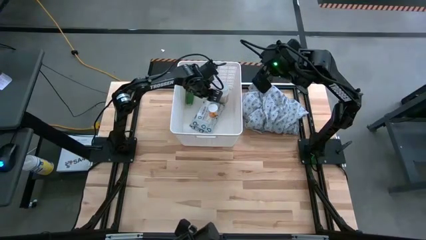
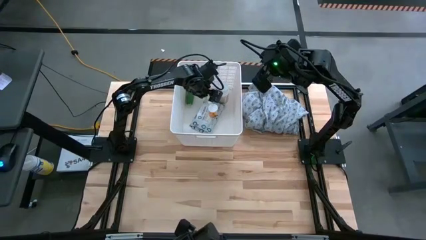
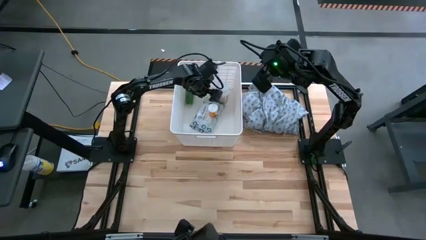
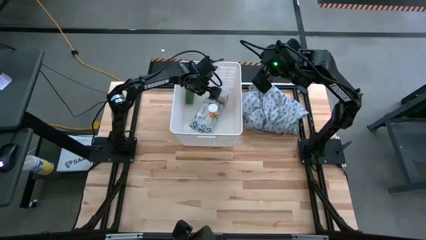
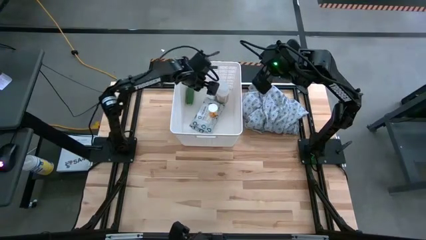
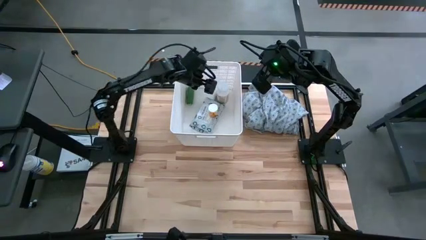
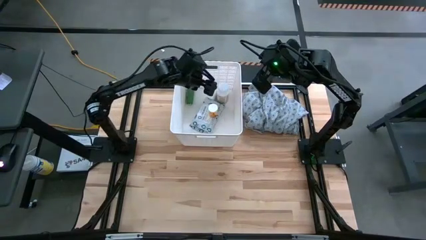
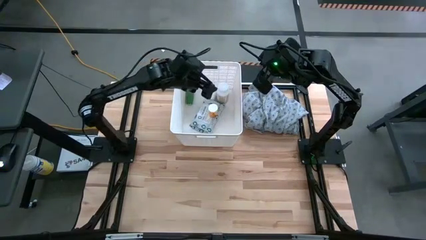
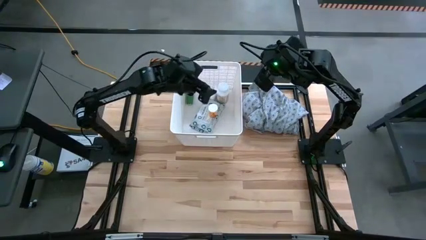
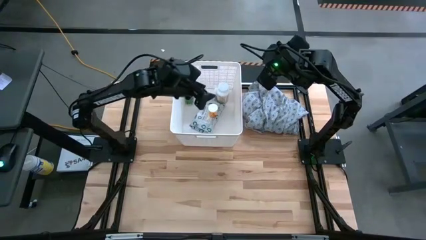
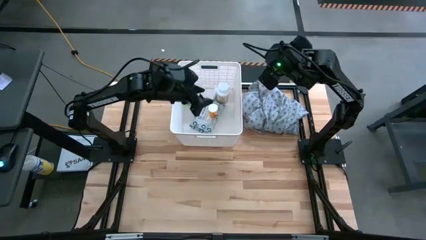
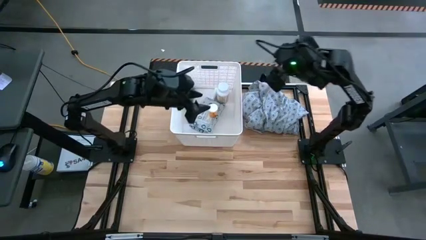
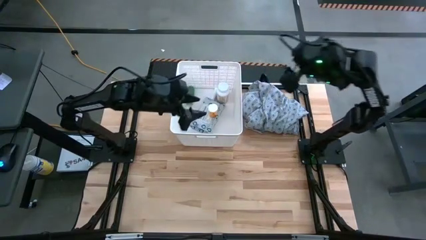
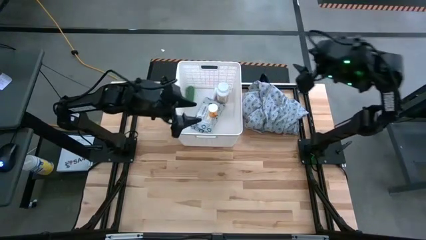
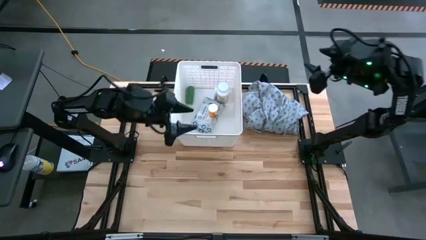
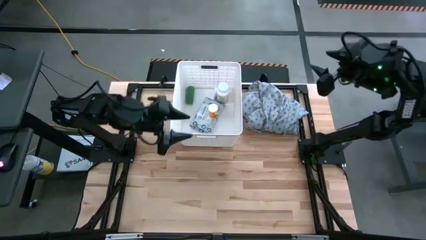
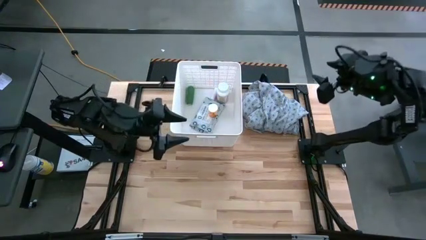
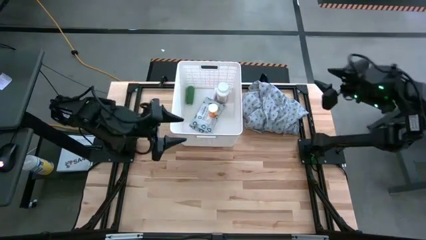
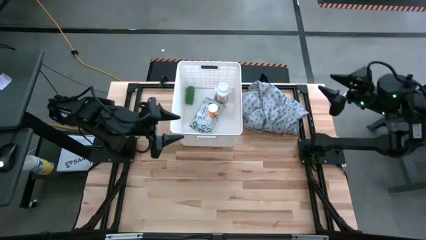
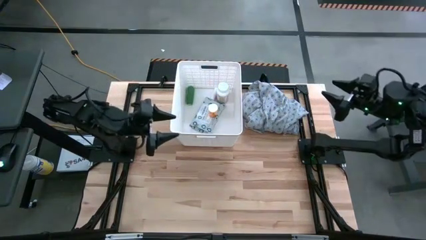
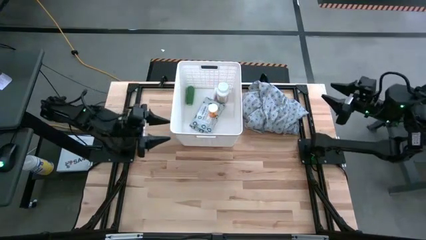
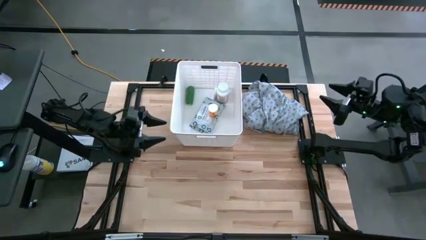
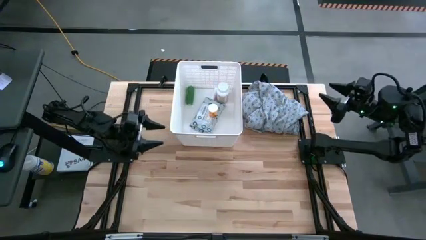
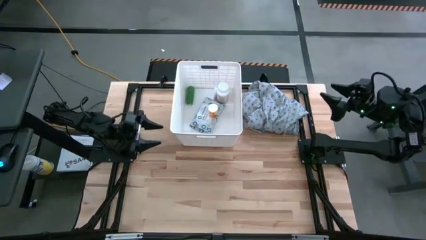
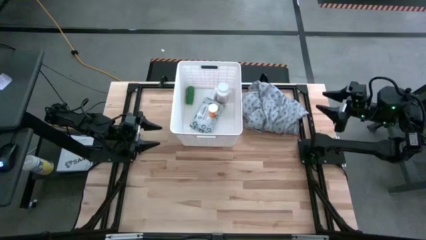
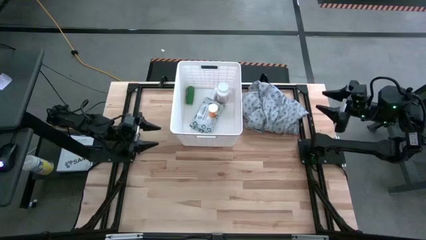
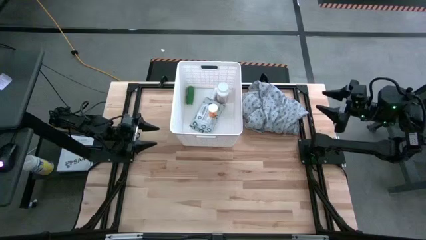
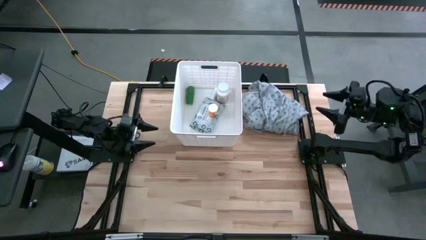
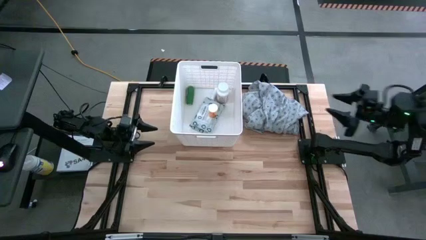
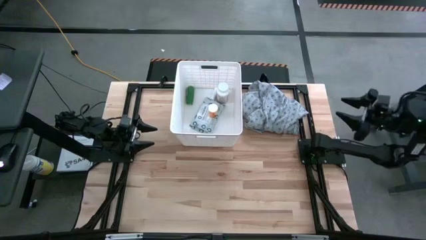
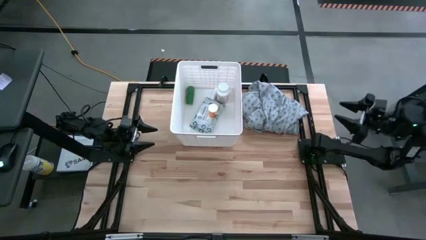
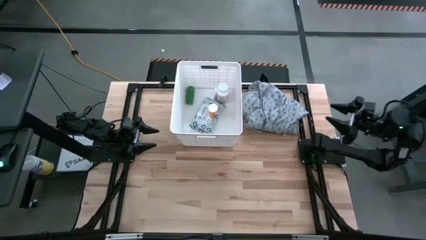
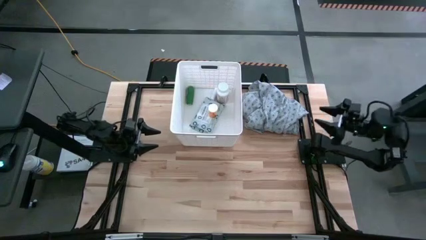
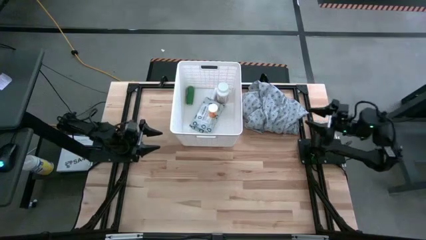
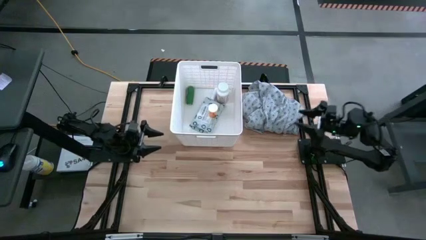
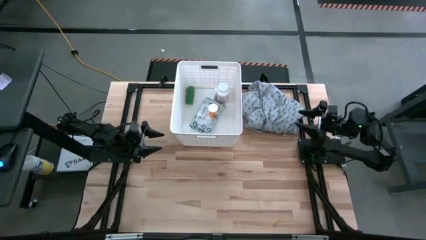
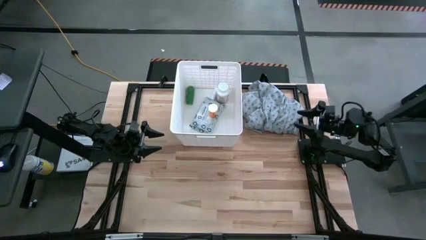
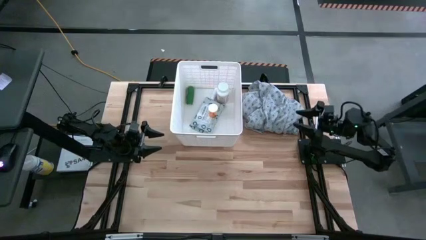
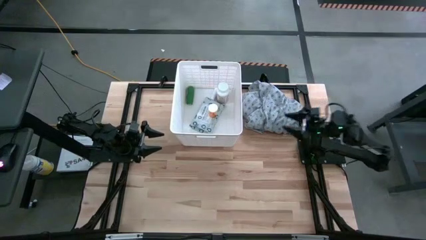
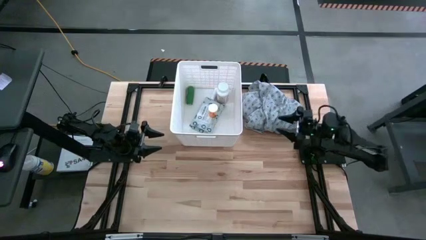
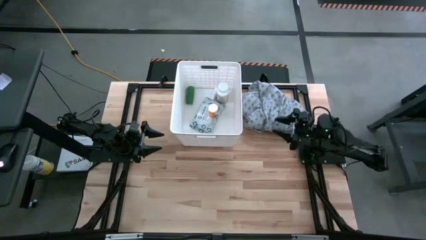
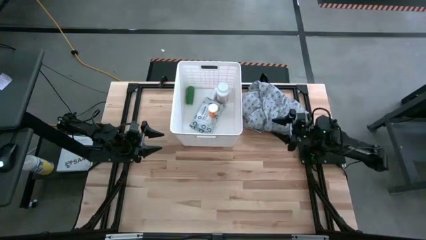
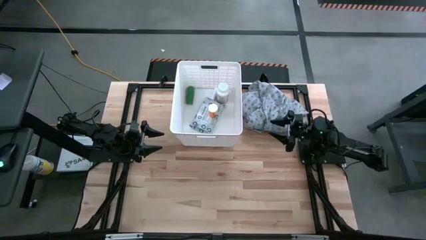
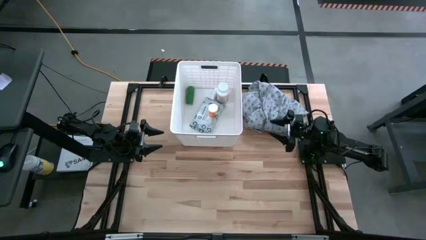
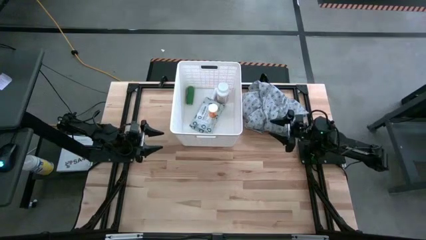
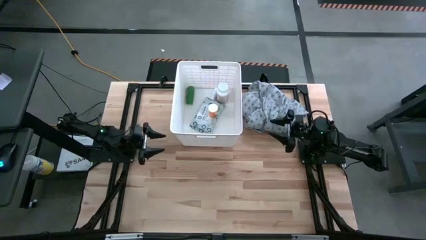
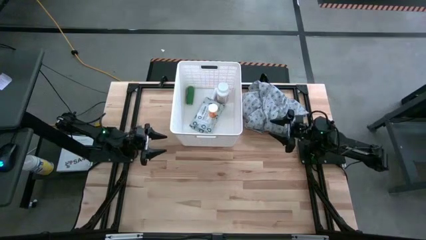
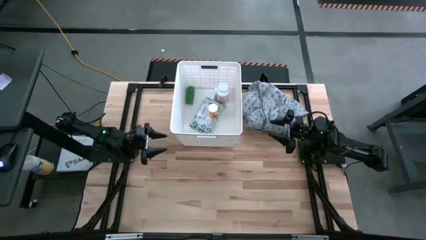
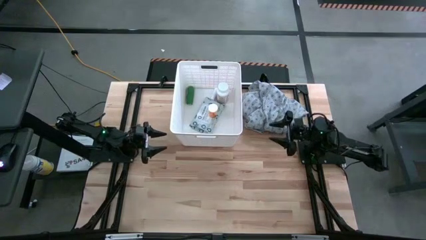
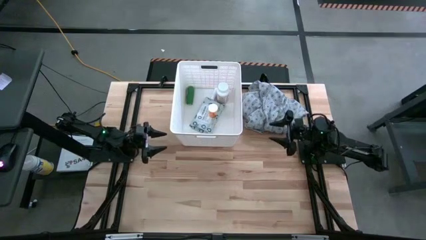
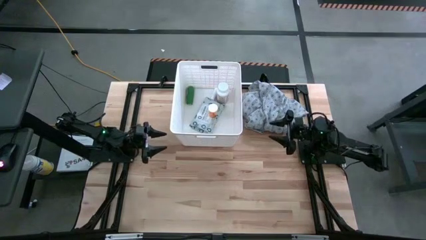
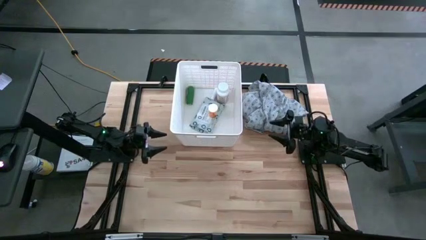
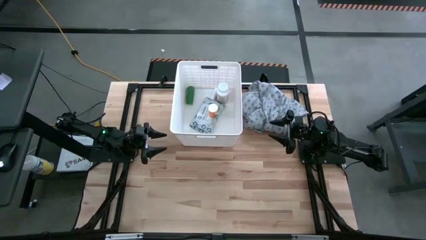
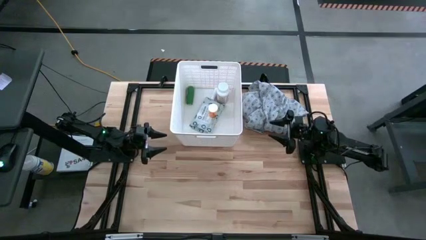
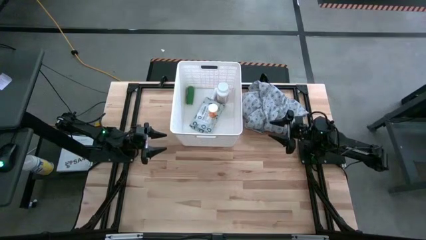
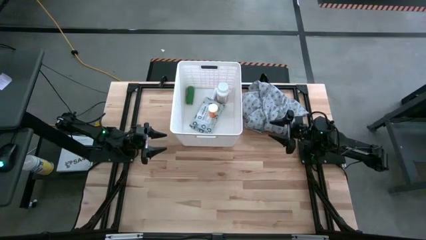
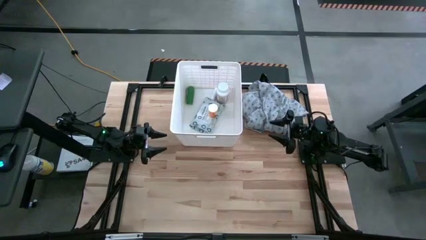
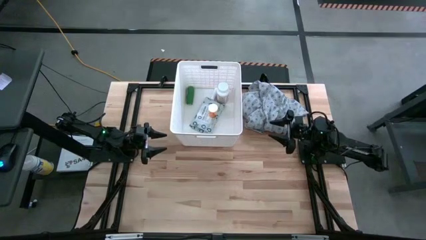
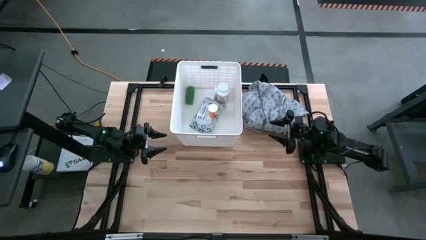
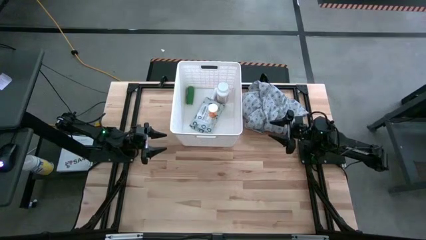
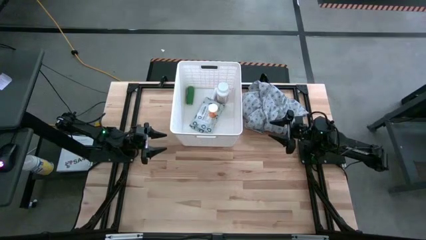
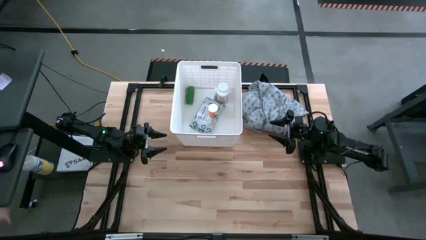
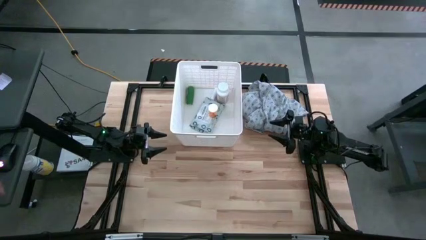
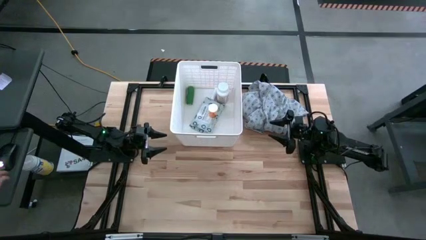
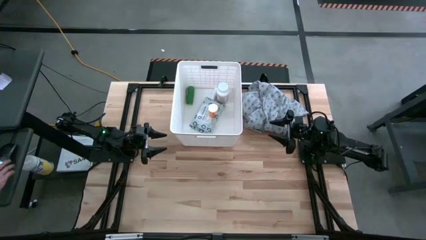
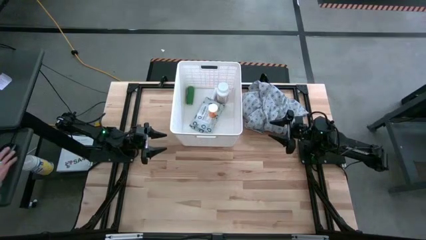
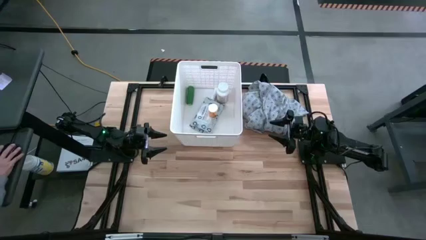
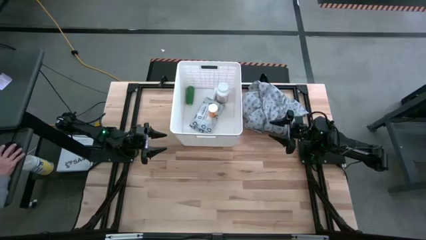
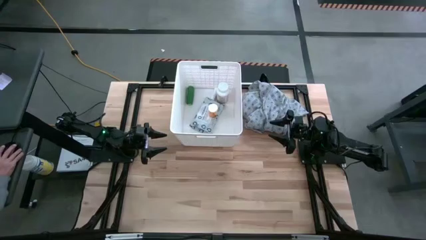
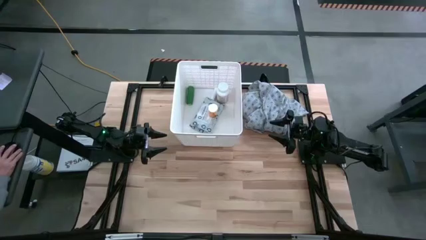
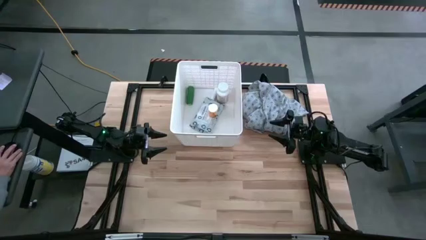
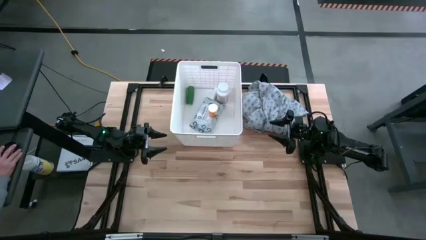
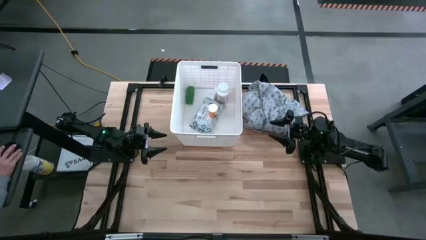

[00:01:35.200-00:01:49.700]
Task: Pick & place medical supplies in basket/bin
Return to Home Position
